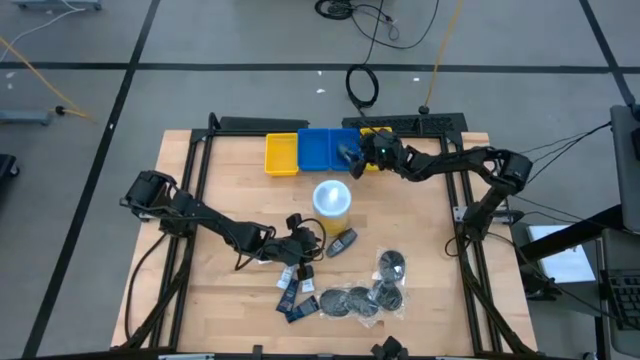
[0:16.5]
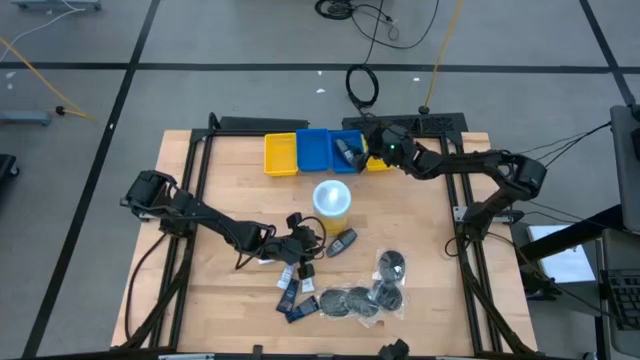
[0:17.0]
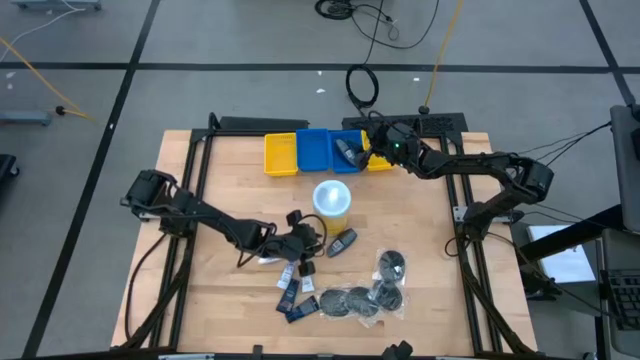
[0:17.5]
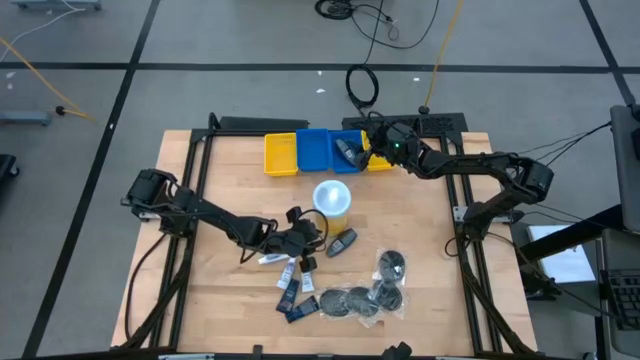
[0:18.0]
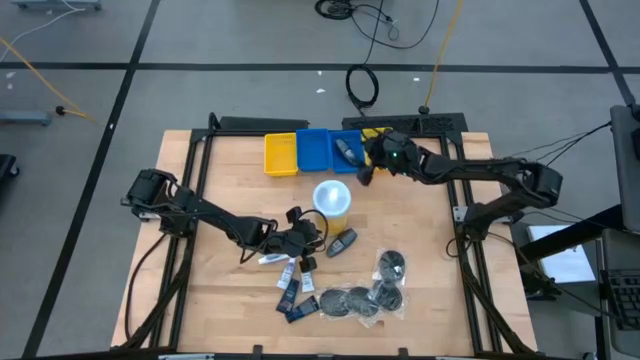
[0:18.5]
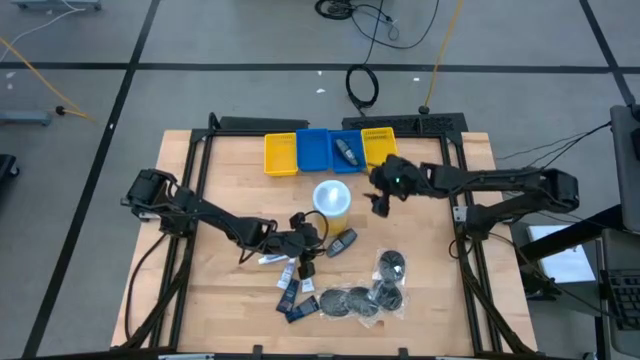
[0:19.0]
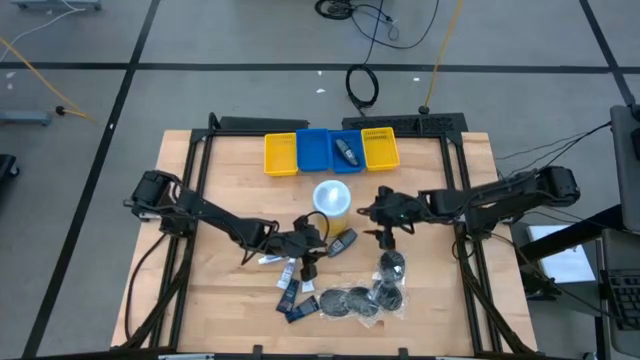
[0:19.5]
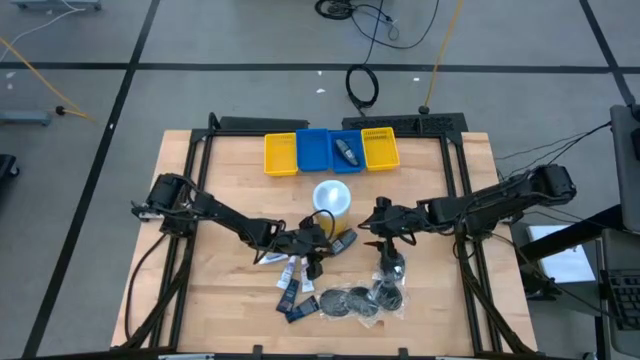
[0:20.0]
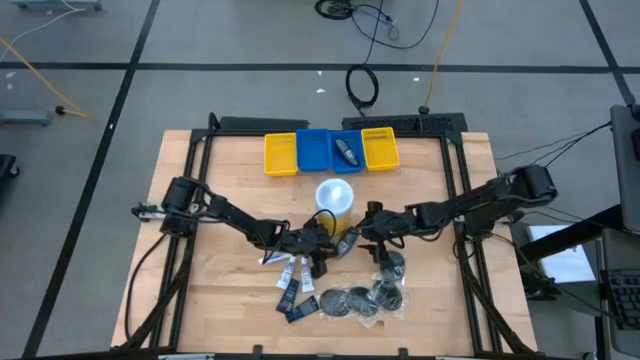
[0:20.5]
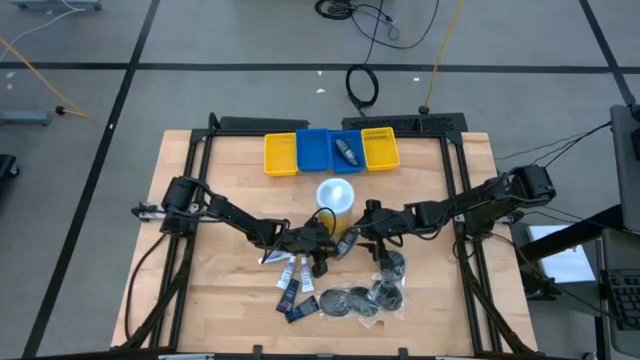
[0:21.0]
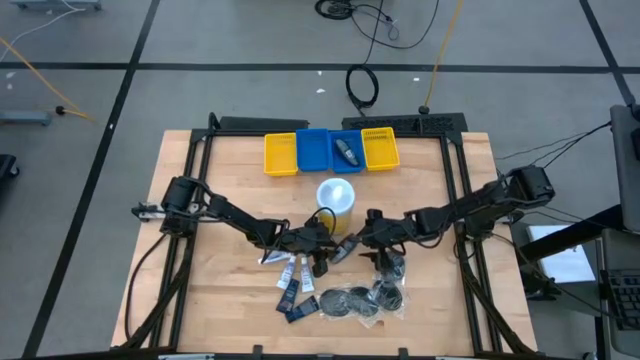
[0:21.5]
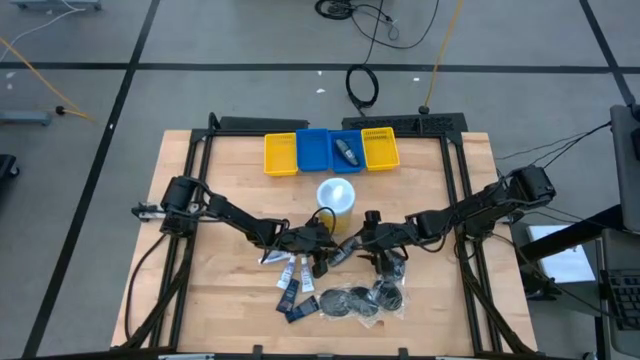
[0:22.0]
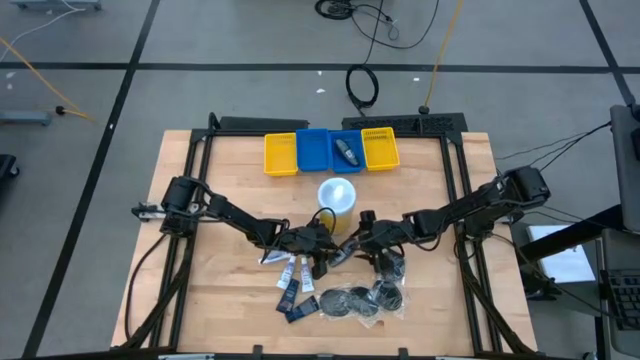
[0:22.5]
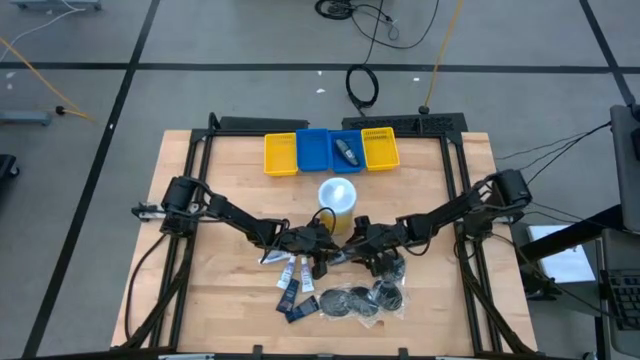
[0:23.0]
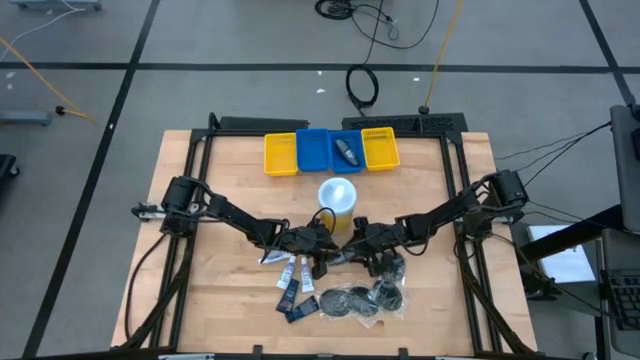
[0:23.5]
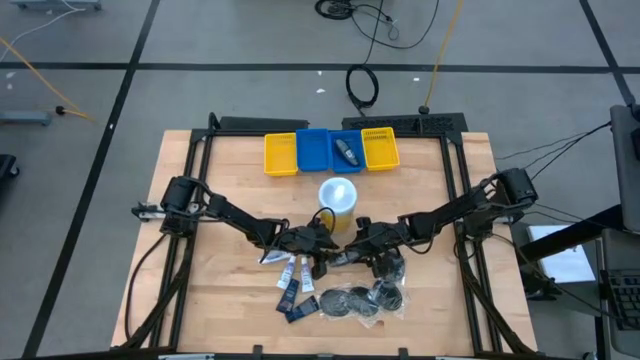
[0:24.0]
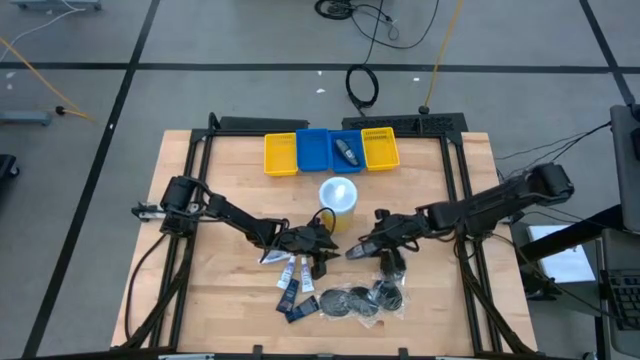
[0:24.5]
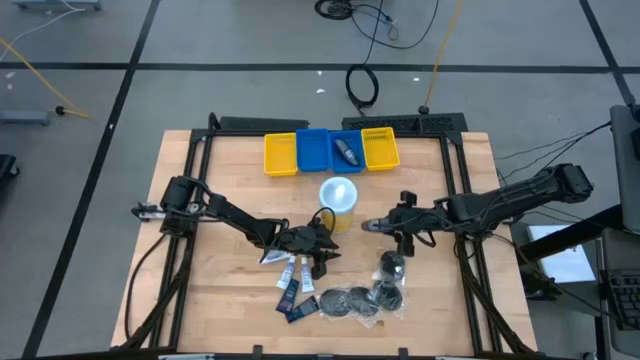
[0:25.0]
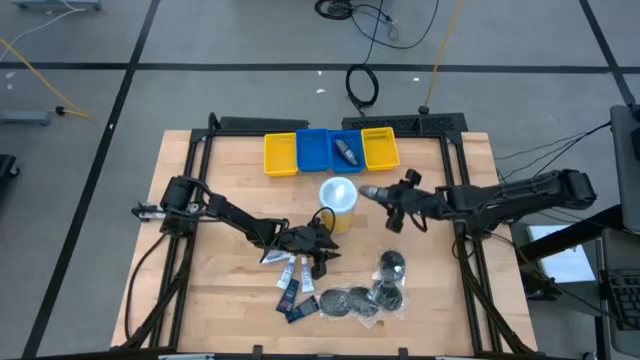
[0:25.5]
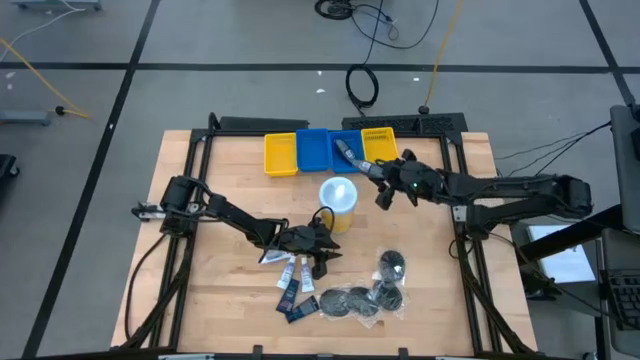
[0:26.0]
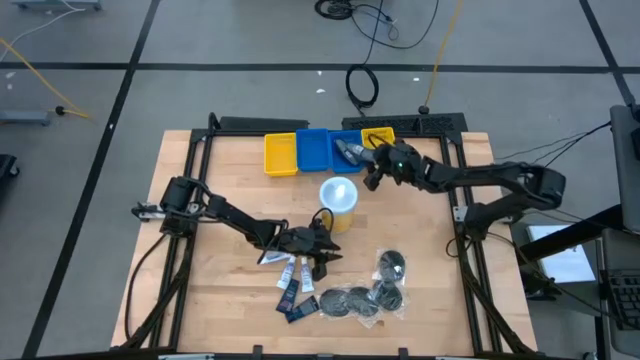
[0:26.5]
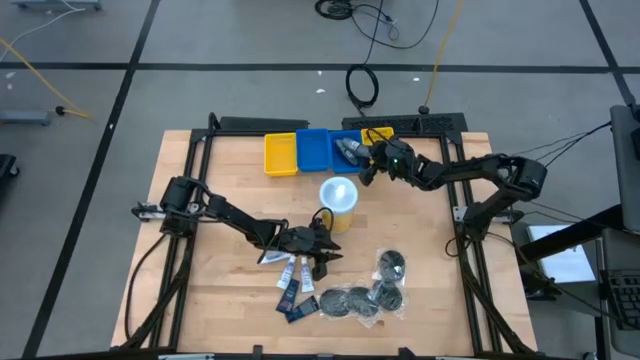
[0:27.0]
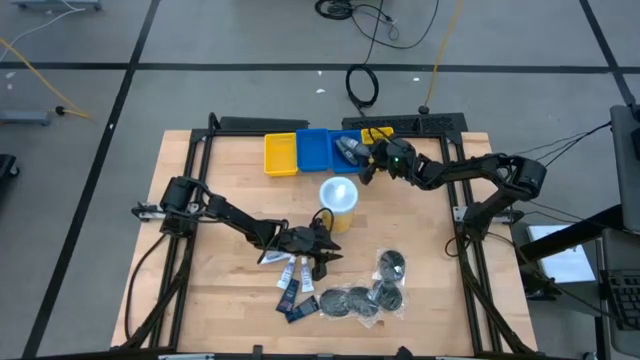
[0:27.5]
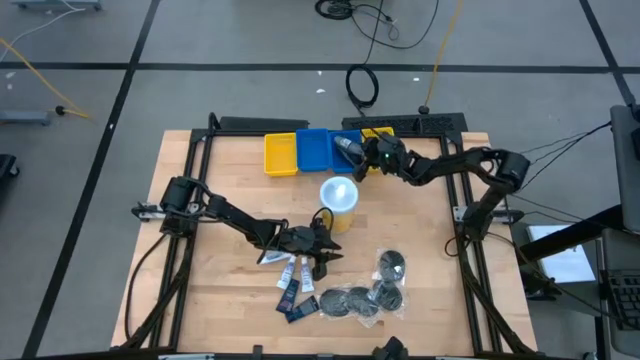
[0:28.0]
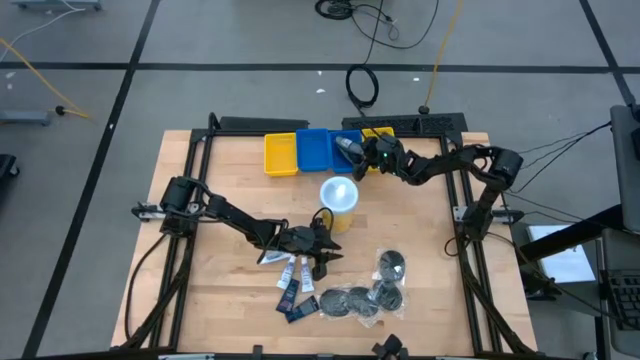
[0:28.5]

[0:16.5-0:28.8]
Task: Pick & Place Travel size toiletries
Put the deodorant into the right blue basket

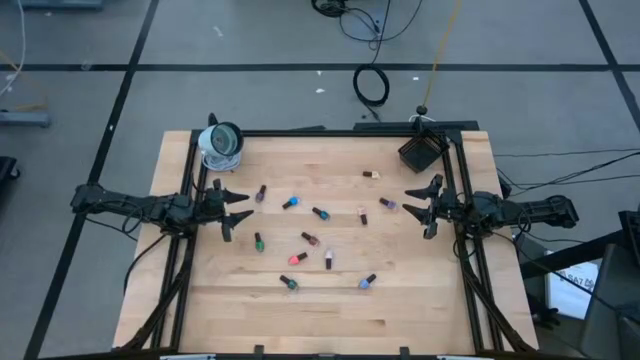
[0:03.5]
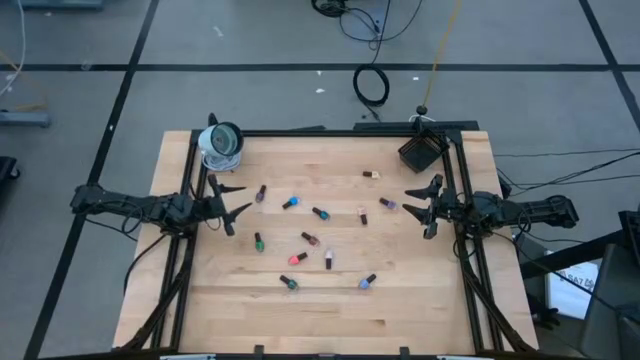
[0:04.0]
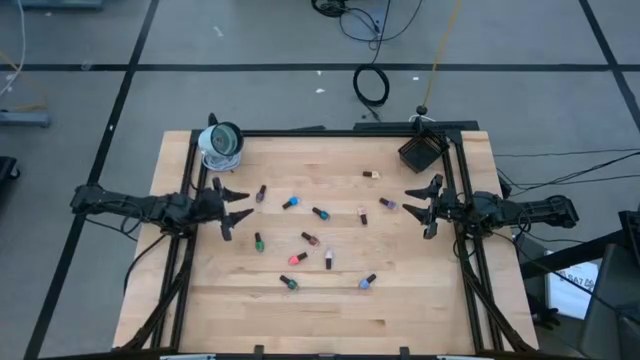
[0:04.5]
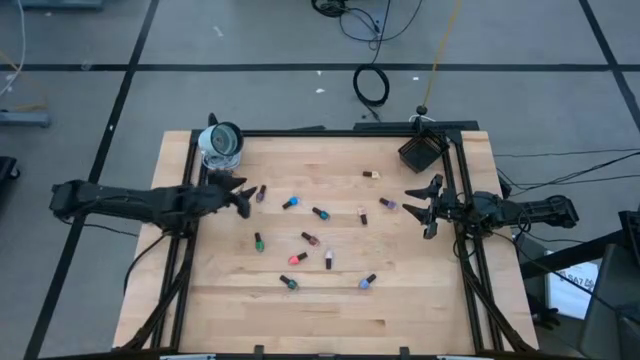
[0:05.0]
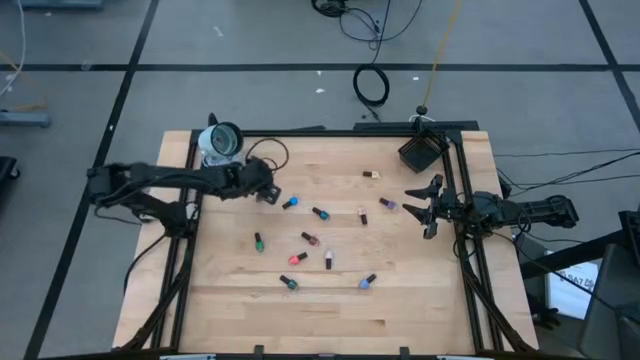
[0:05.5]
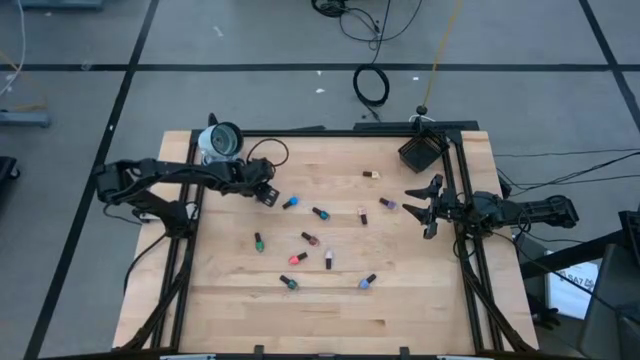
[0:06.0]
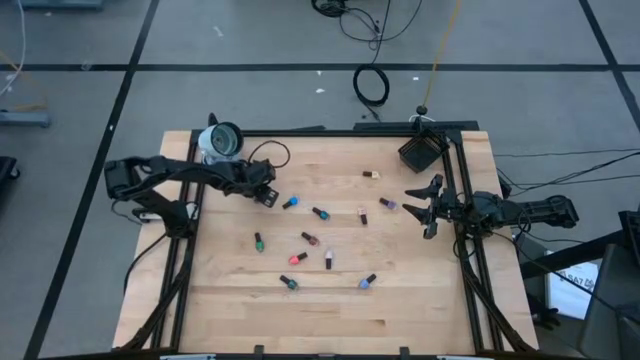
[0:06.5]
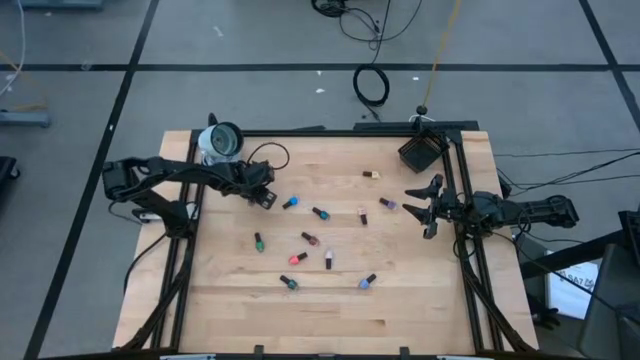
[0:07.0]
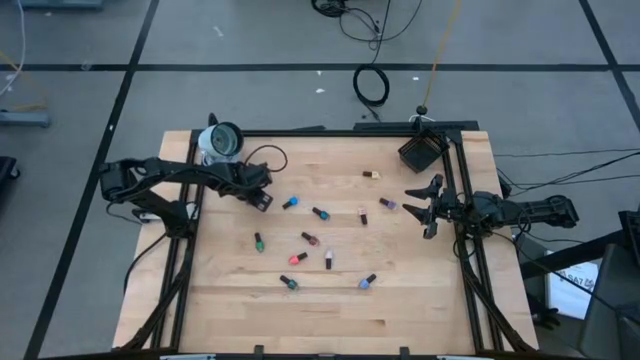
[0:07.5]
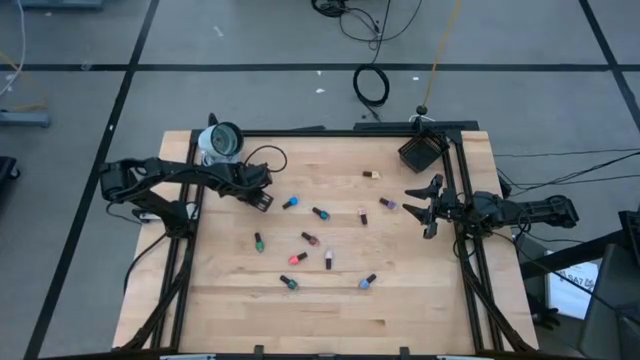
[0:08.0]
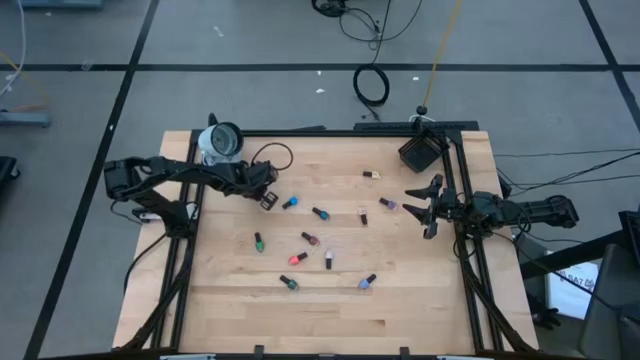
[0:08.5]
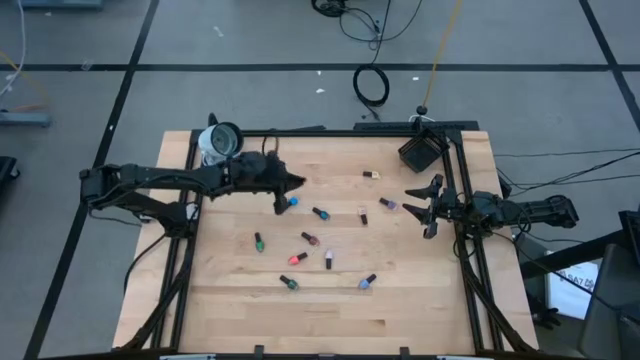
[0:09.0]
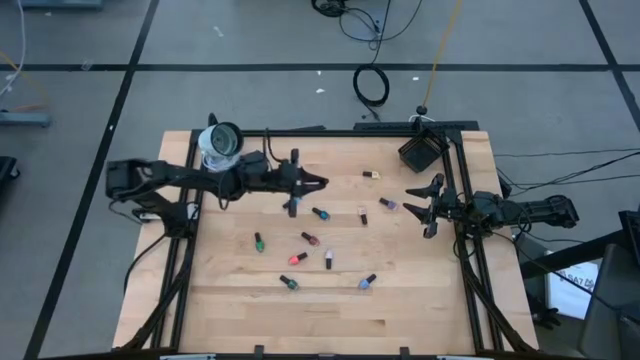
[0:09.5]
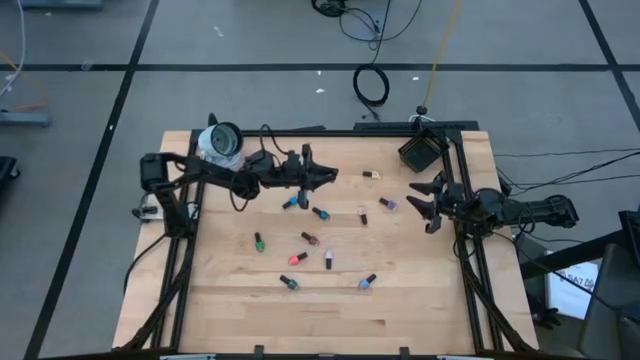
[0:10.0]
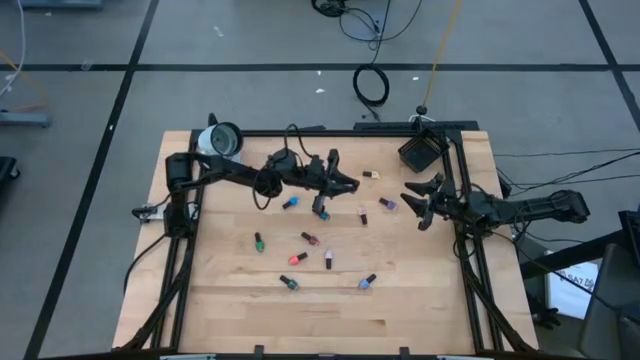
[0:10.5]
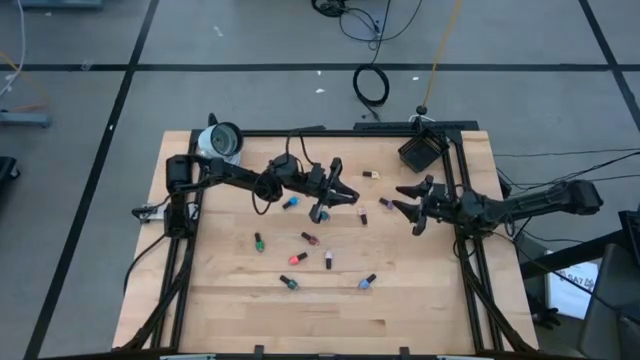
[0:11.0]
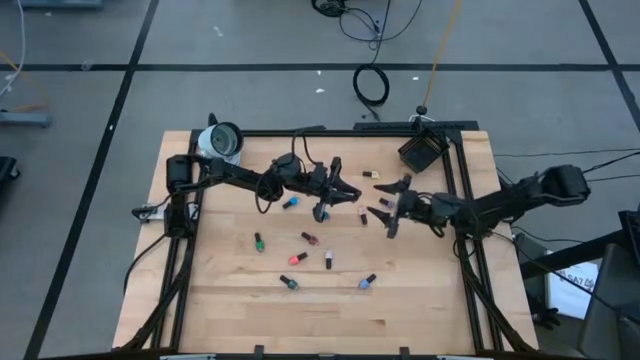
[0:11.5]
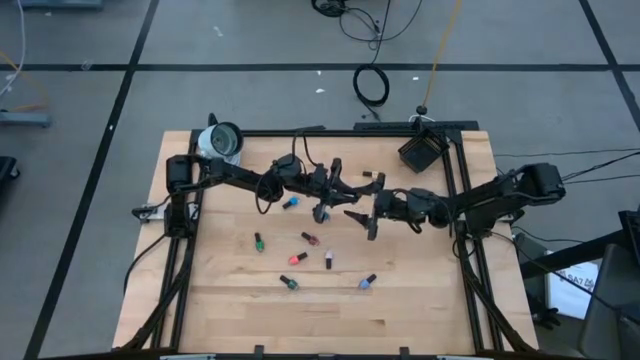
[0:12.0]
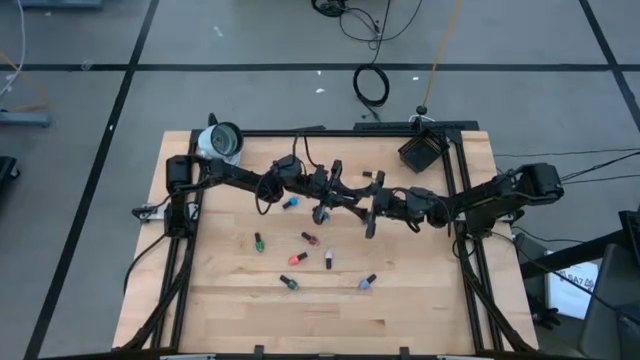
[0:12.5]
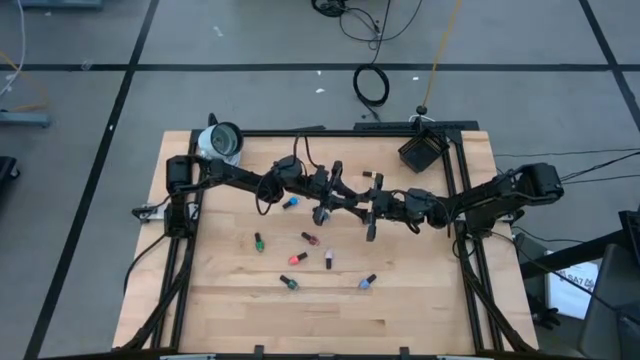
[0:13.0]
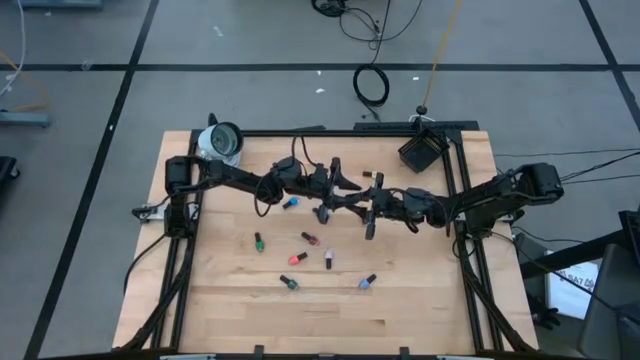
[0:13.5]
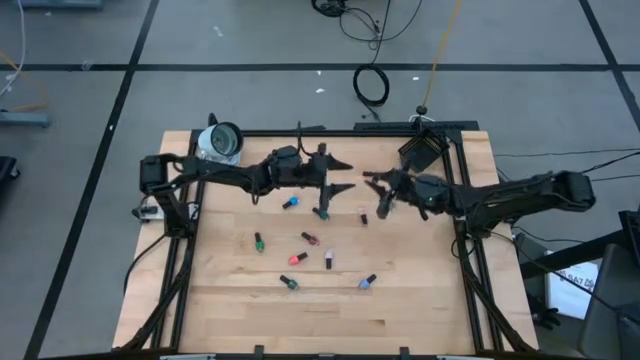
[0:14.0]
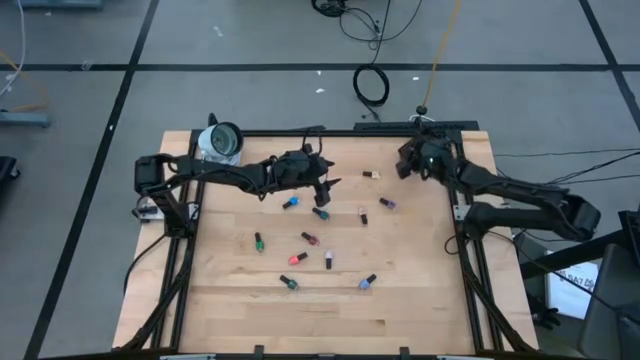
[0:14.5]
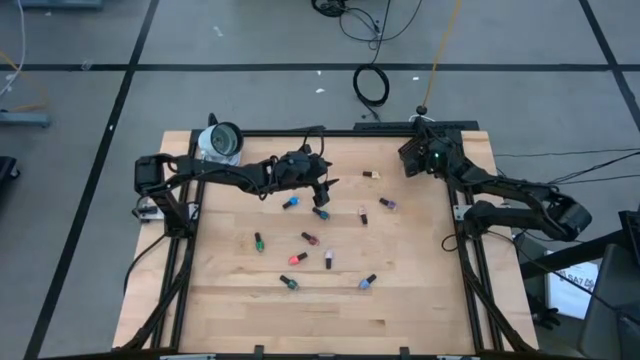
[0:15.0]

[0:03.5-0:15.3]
Task: Pick & Place Nail Polish
Put the purple nail polish into the black bin
